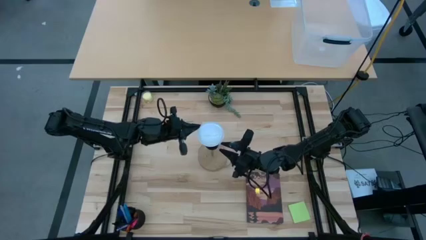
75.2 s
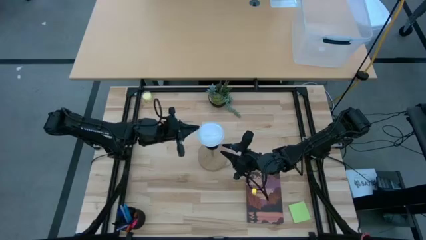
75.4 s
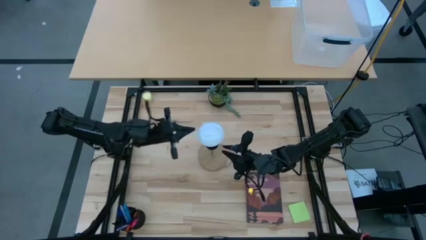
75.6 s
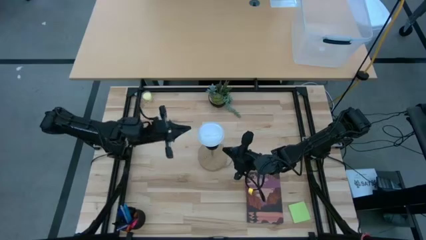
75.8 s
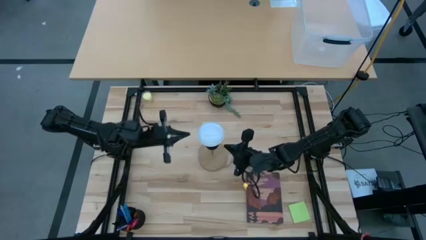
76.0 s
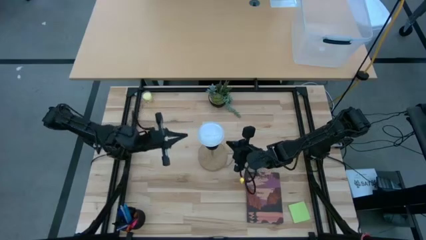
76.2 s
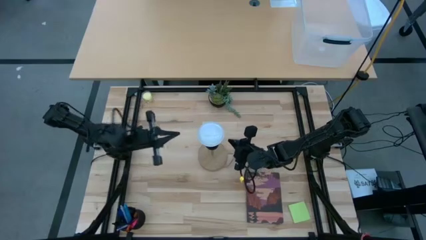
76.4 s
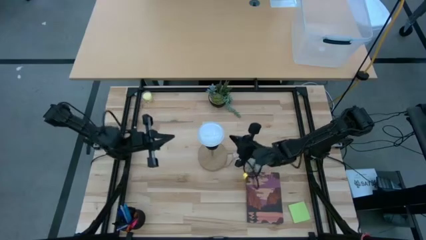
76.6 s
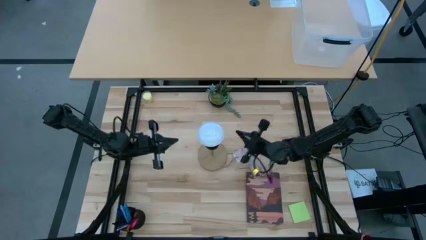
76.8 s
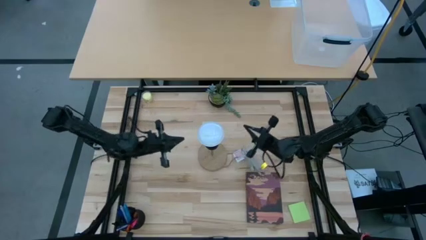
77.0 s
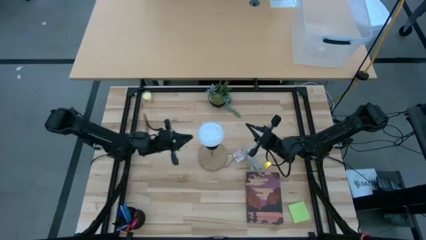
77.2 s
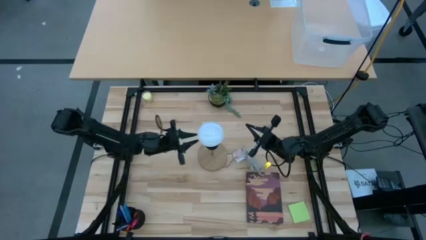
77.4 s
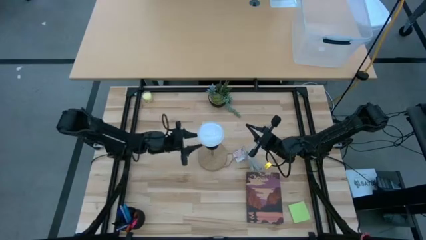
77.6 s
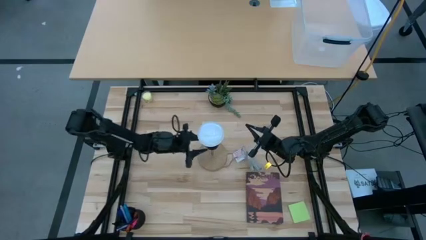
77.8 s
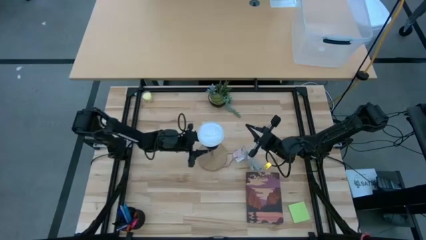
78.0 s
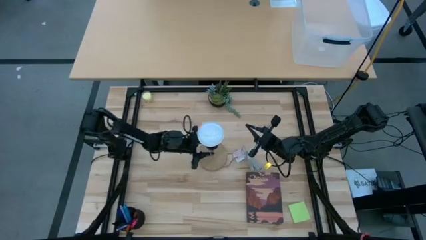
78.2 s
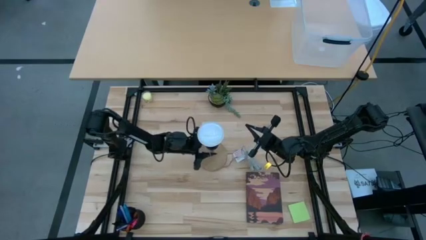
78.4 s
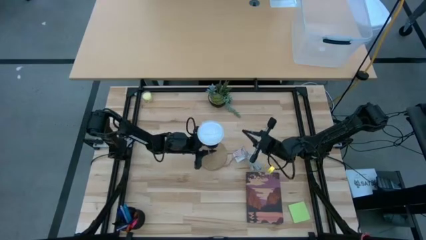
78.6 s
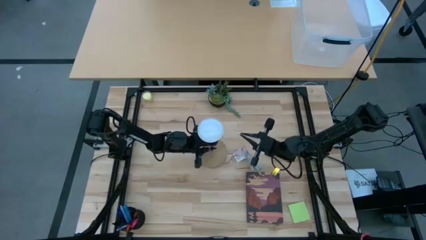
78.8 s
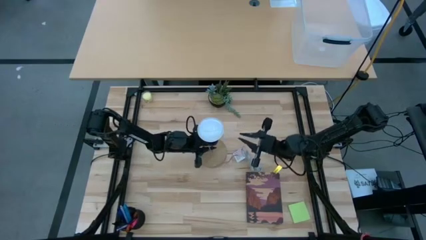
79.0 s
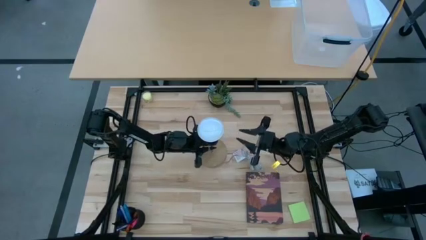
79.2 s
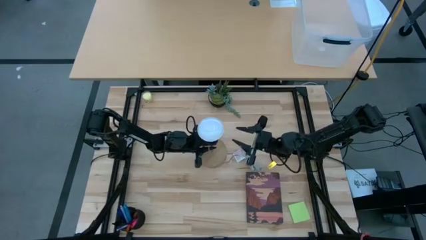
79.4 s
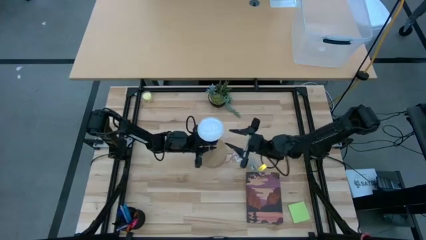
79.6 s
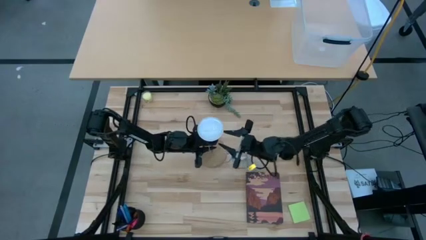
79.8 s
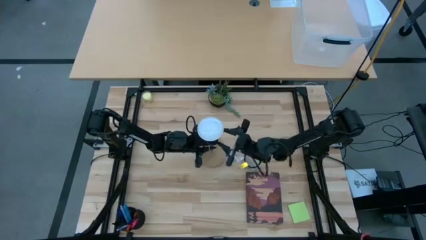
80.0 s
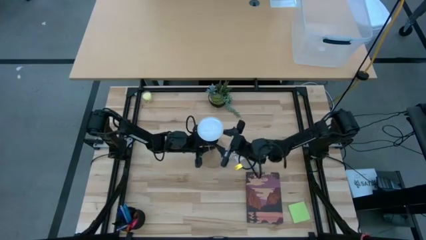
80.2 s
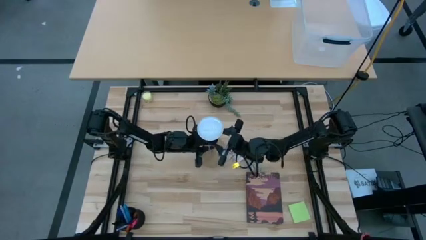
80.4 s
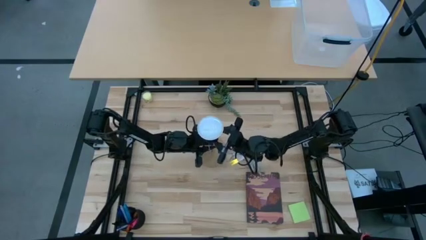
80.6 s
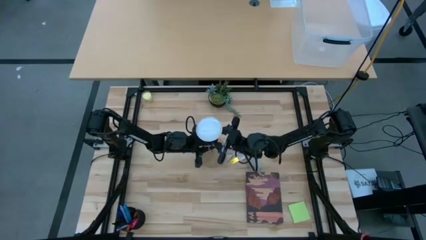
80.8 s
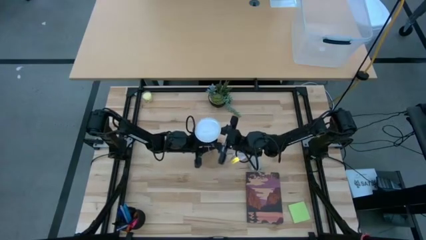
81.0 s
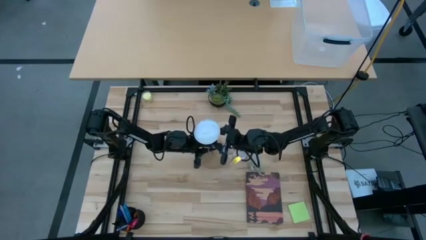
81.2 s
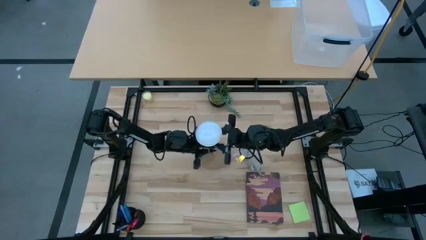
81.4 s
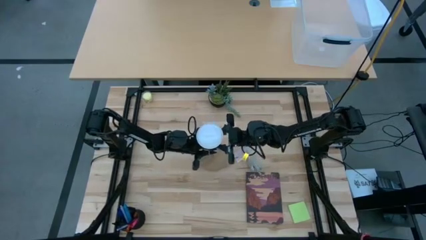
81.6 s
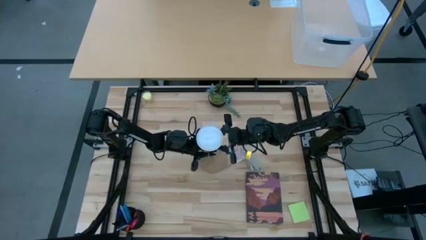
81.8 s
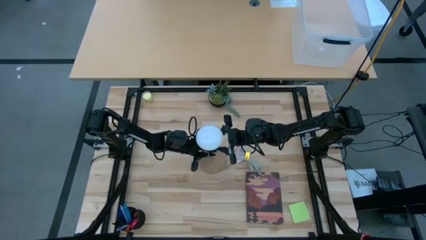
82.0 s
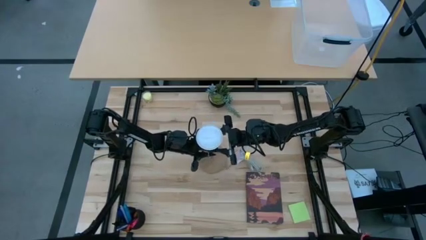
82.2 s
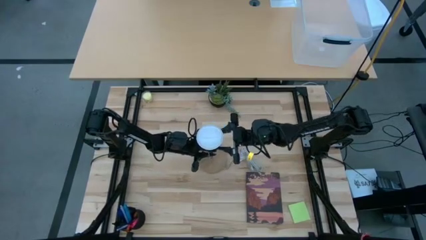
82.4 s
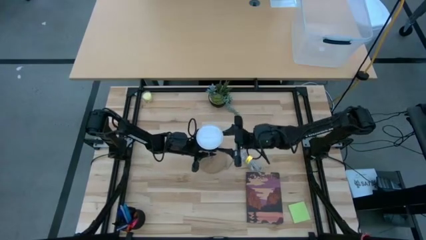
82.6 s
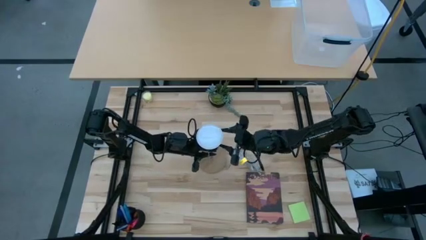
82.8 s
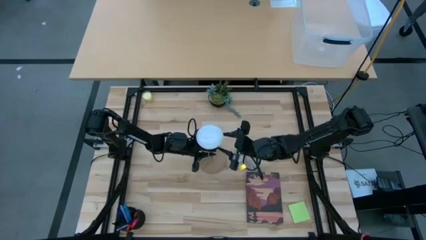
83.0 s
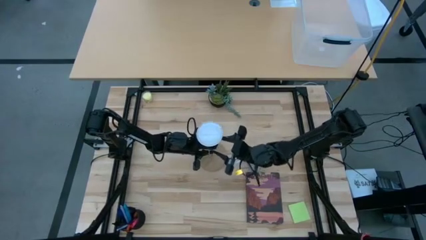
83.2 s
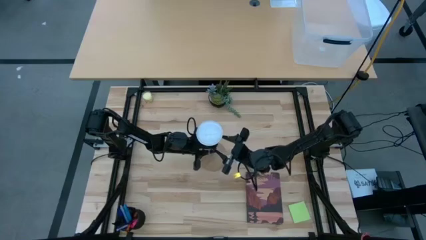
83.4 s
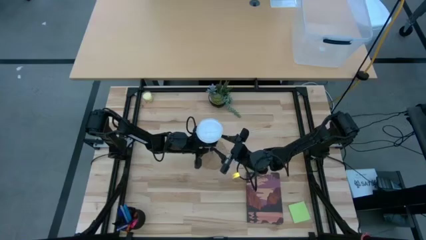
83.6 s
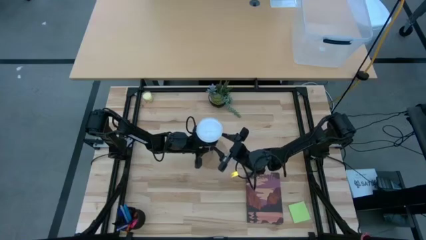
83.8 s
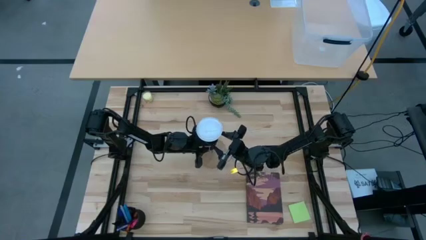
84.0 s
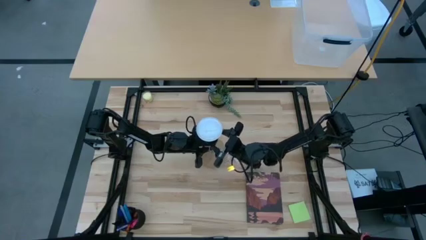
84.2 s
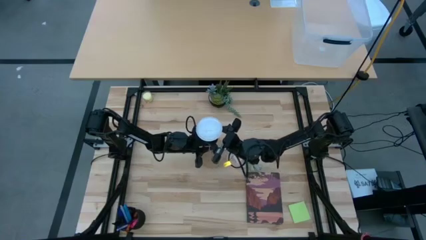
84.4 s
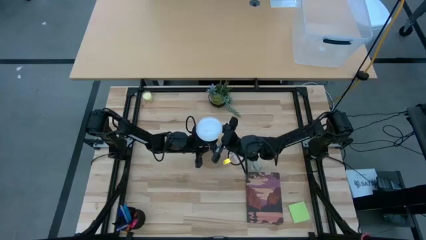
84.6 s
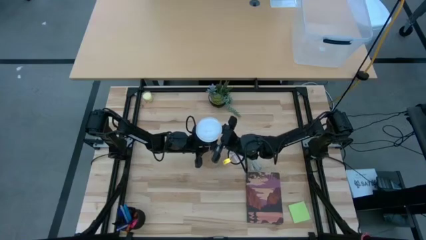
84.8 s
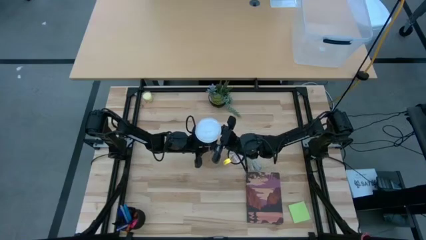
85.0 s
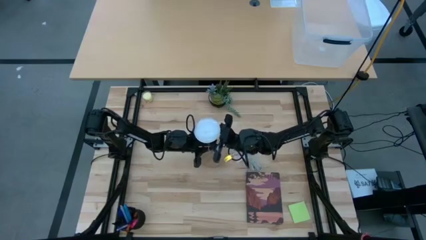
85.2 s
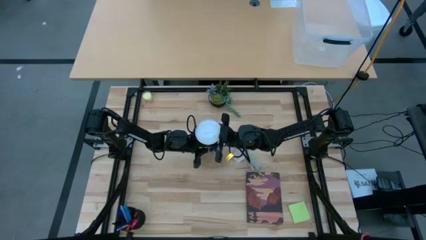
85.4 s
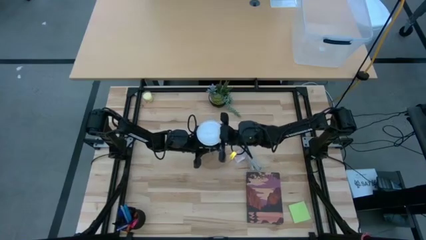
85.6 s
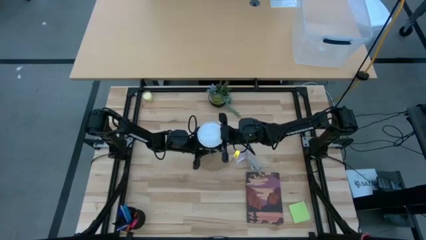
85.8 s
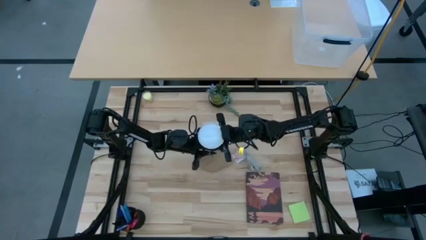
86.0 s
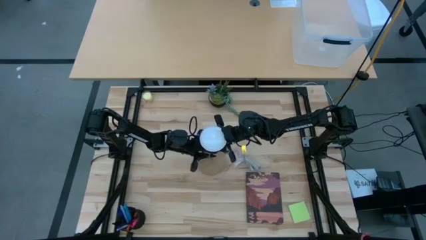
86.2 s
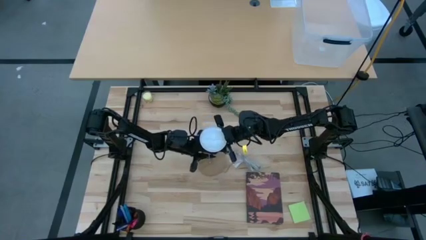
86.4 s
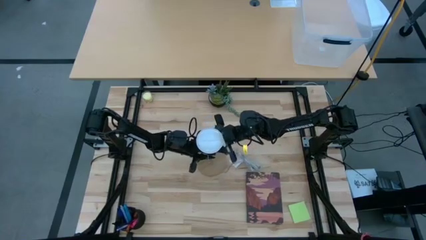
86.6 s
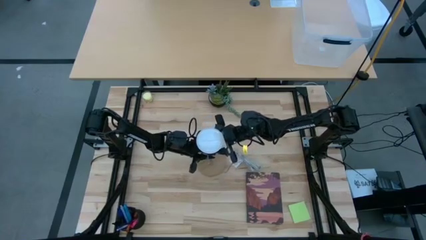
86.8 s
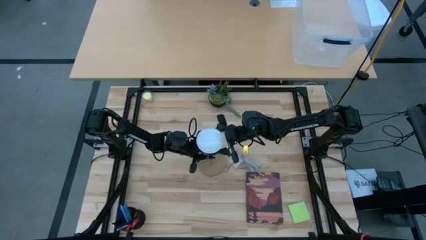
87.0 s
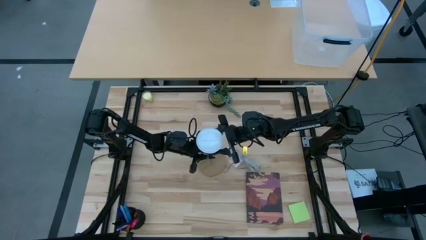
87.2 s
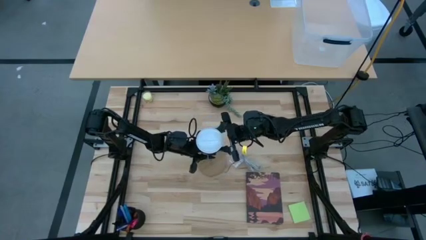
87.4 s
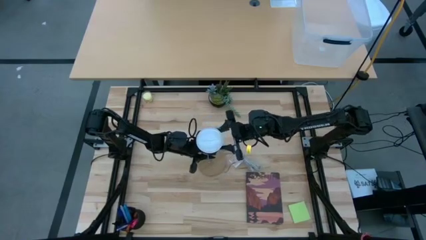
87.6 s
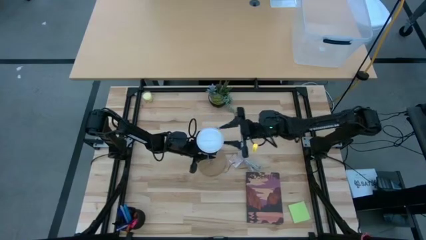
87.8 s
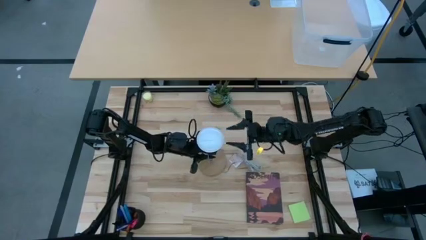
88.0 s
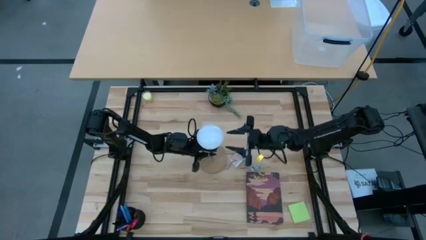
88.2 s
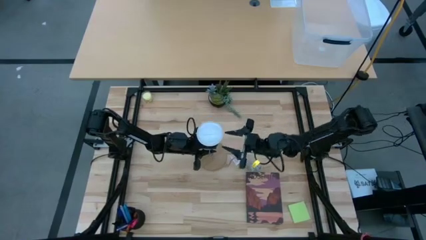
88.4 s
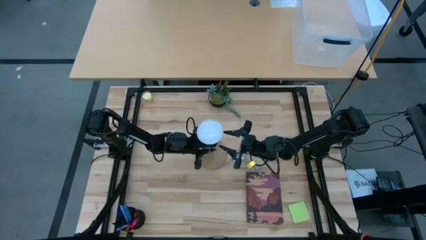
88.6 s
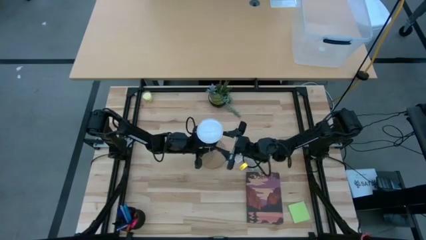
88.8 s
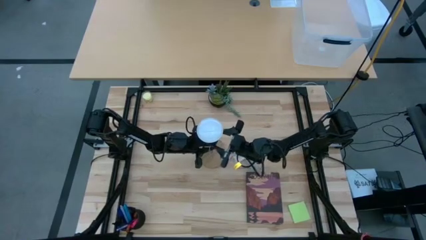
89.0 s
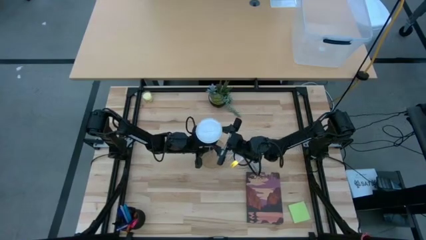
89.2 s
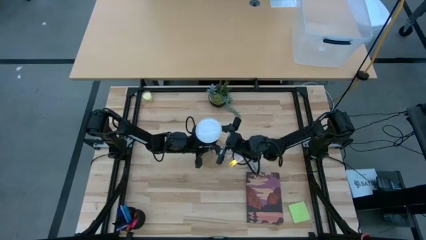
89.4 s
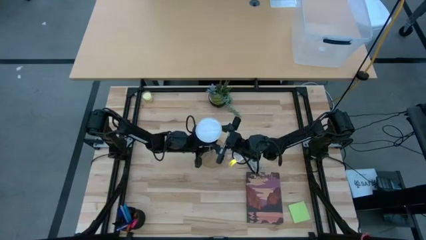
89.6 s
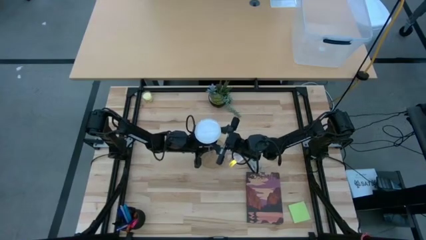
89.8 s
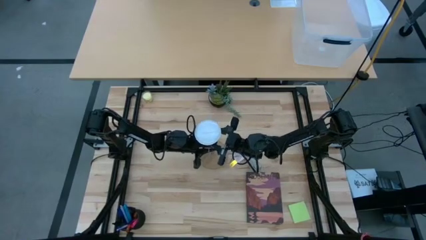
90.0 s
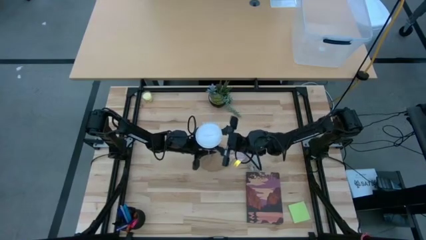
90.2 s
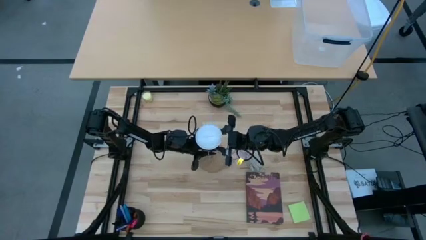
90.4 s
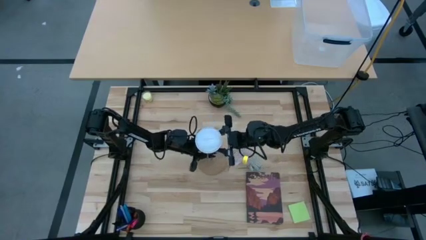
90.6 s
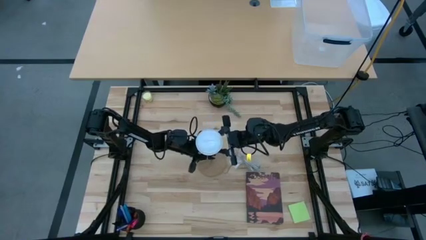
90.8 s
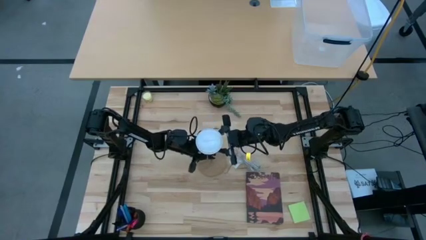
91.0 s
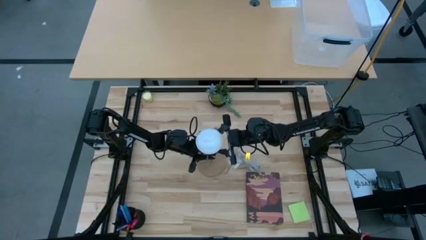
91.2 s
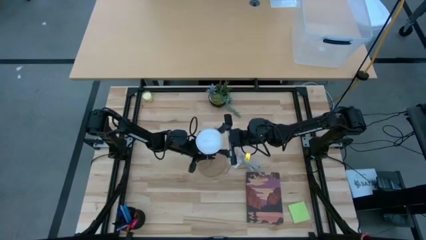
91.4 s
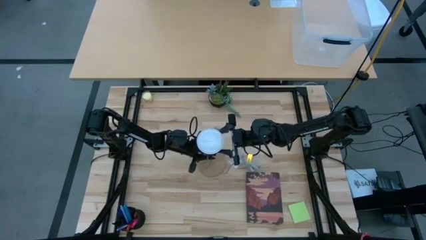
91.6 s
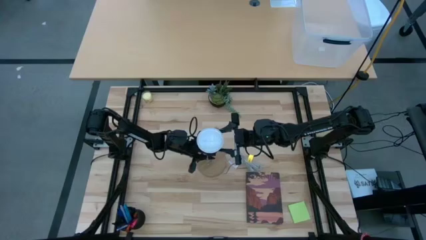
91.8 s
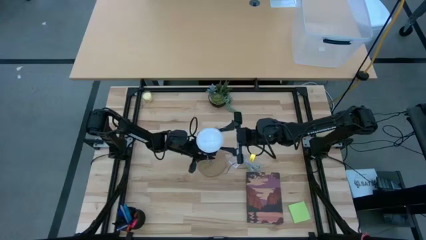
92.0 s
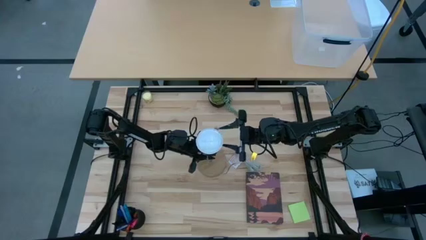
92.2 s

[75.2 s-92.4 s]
Task: Screw lightbulb
Remove the white lightbulb from the silver lamp
